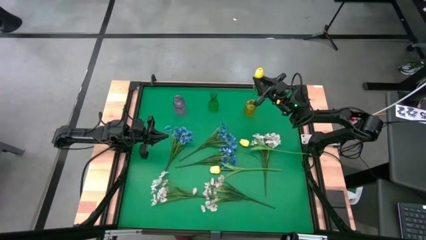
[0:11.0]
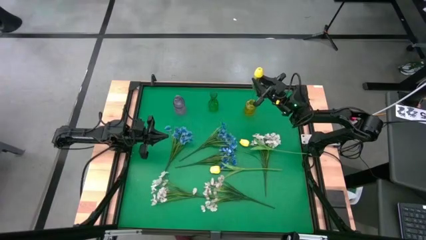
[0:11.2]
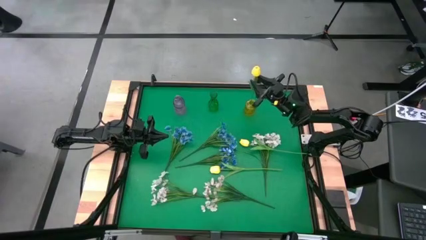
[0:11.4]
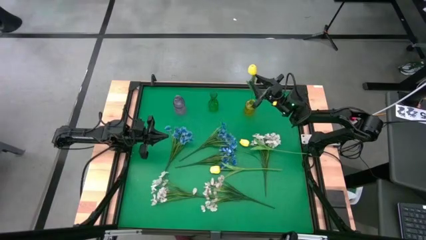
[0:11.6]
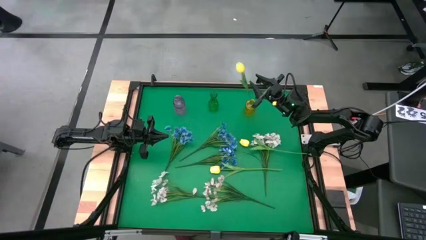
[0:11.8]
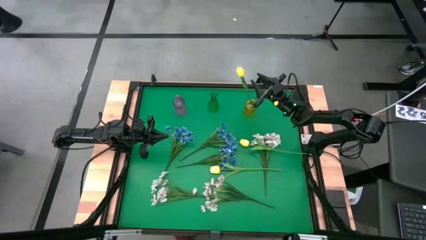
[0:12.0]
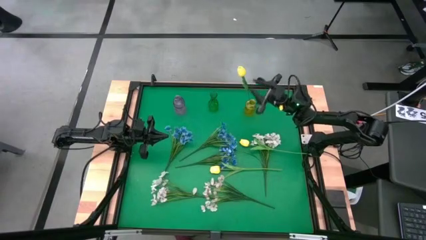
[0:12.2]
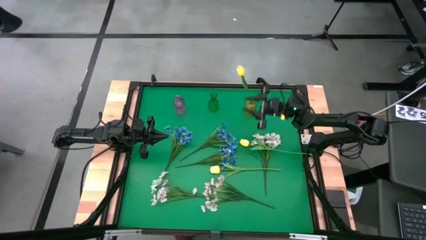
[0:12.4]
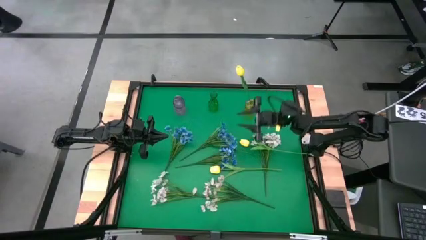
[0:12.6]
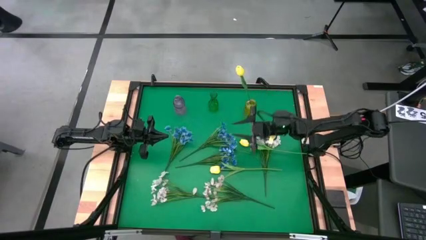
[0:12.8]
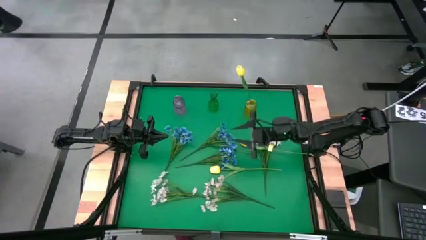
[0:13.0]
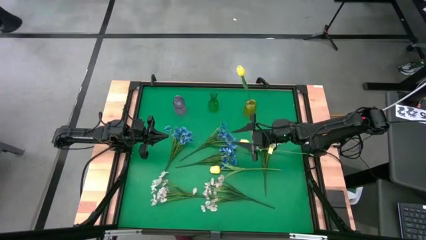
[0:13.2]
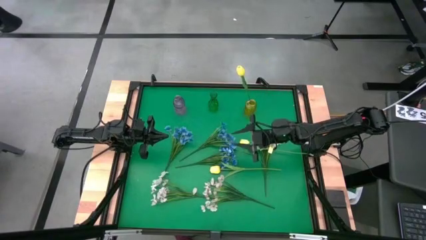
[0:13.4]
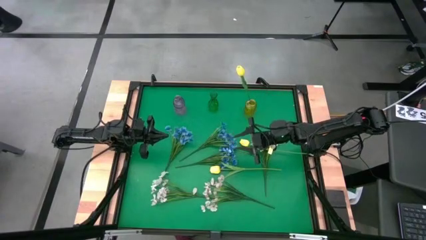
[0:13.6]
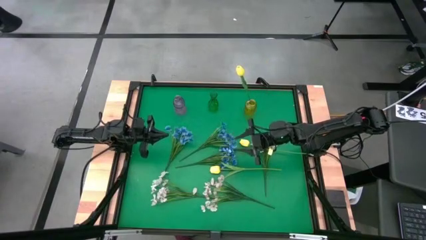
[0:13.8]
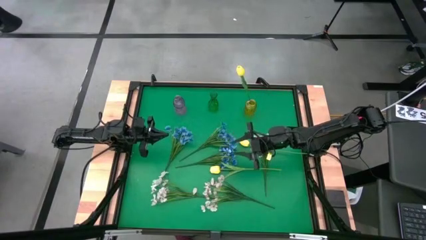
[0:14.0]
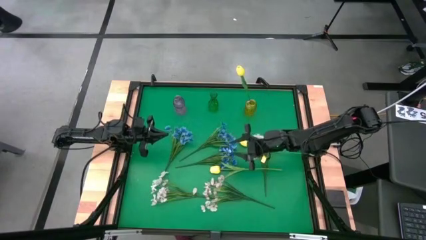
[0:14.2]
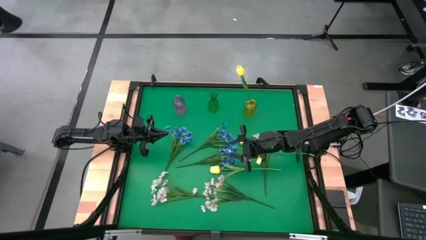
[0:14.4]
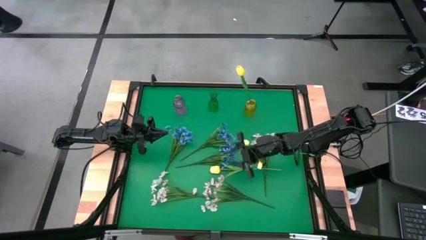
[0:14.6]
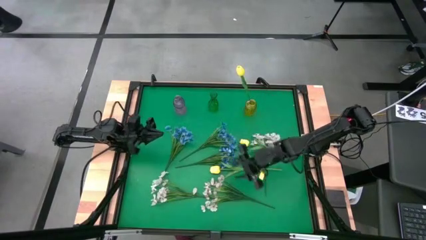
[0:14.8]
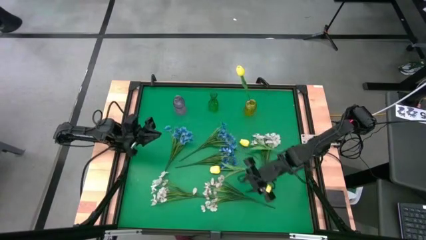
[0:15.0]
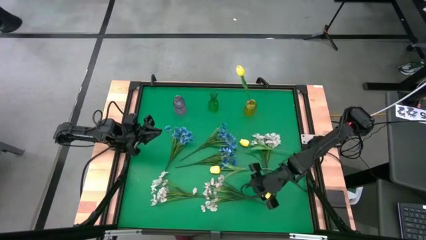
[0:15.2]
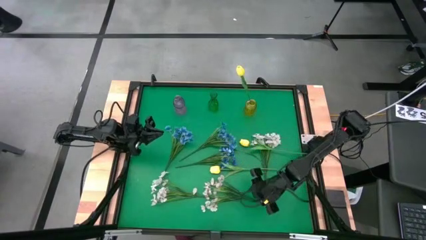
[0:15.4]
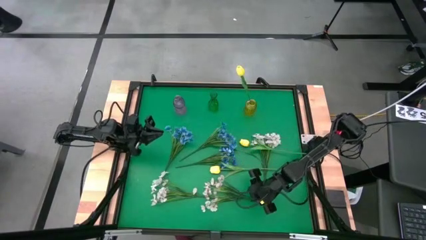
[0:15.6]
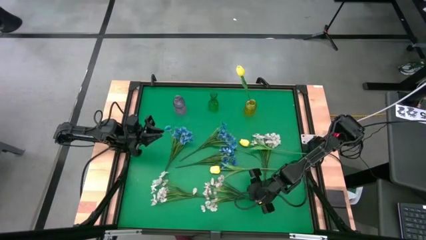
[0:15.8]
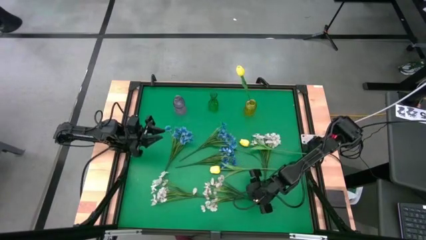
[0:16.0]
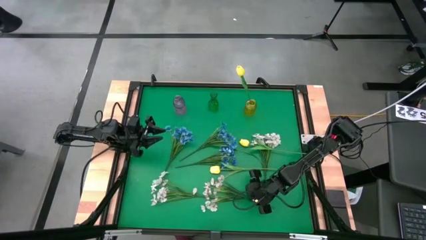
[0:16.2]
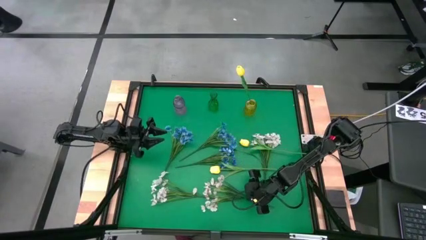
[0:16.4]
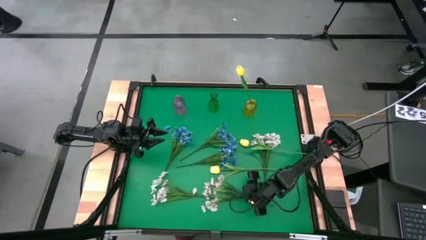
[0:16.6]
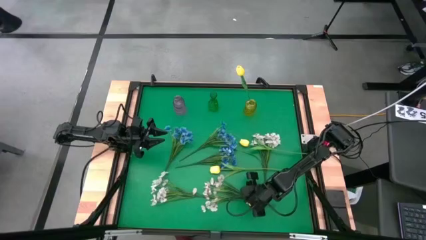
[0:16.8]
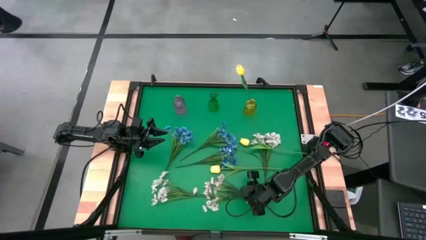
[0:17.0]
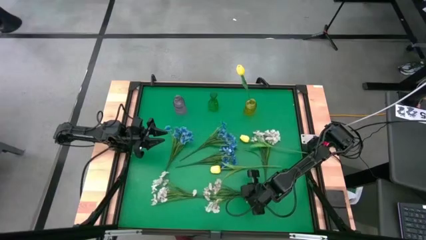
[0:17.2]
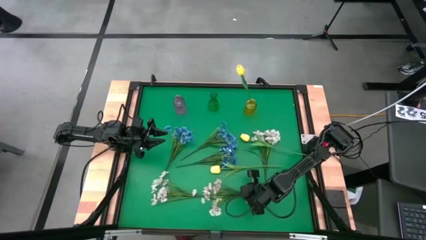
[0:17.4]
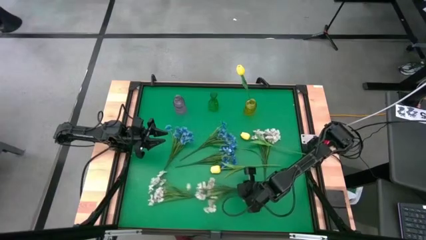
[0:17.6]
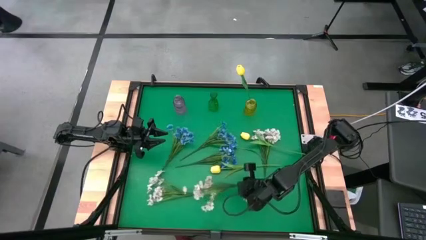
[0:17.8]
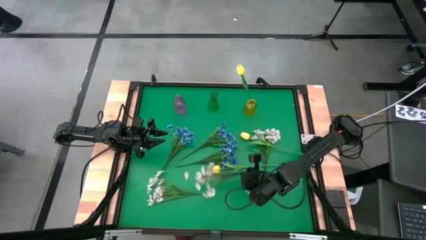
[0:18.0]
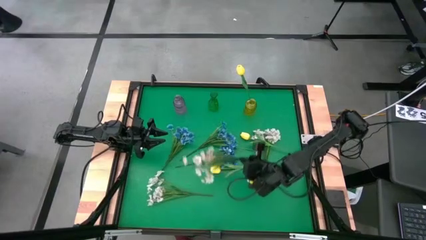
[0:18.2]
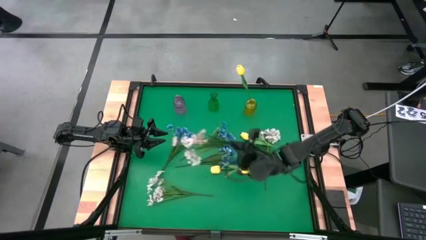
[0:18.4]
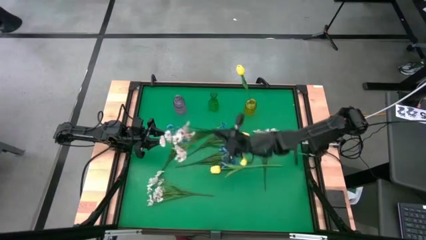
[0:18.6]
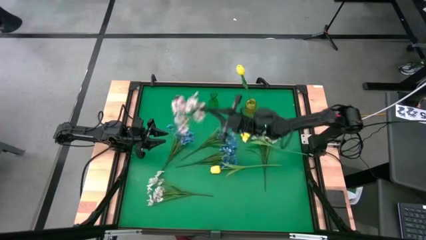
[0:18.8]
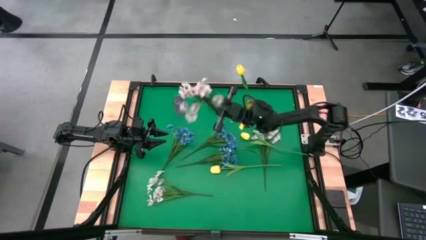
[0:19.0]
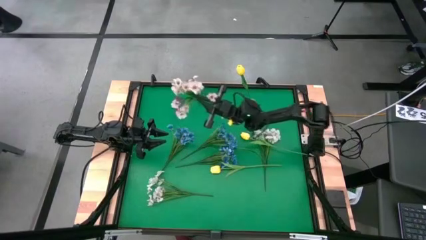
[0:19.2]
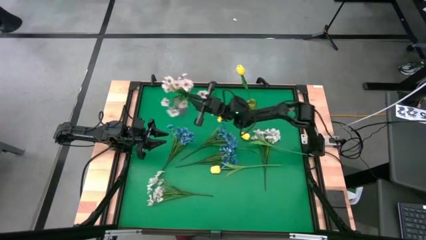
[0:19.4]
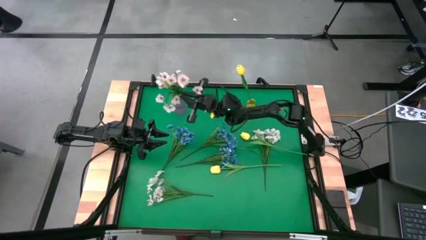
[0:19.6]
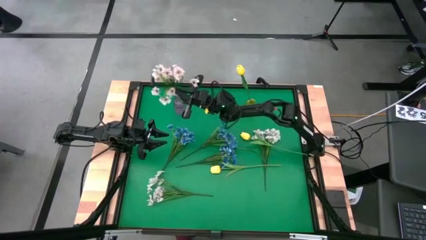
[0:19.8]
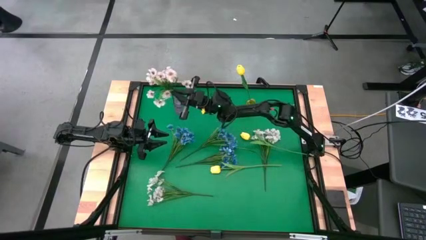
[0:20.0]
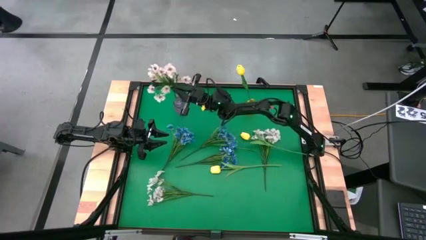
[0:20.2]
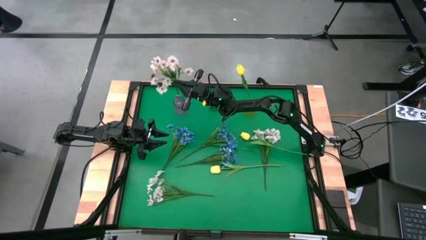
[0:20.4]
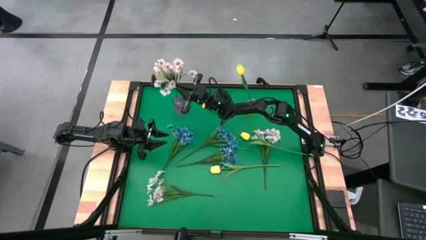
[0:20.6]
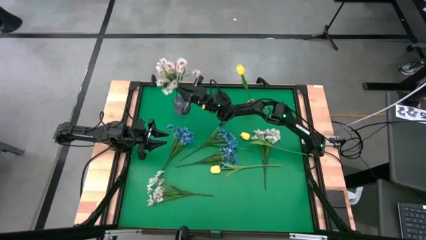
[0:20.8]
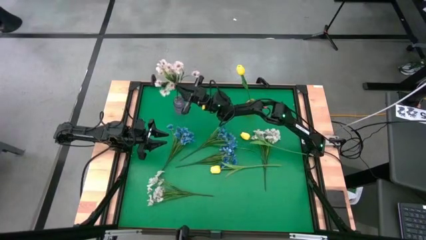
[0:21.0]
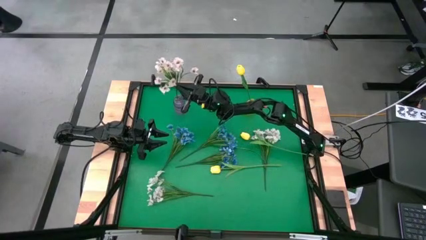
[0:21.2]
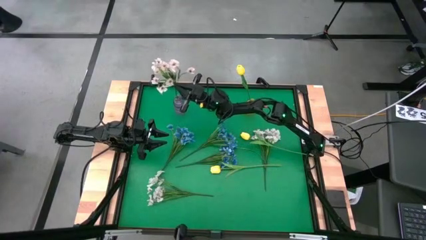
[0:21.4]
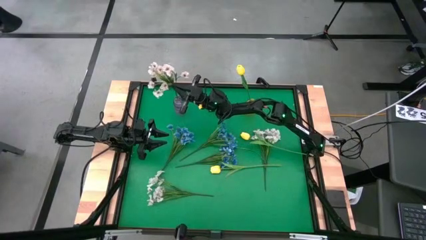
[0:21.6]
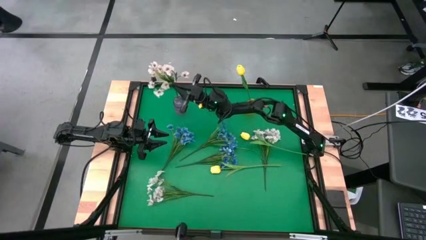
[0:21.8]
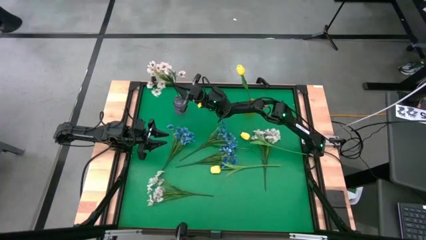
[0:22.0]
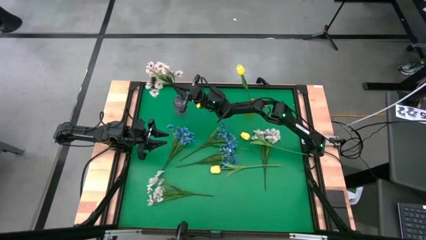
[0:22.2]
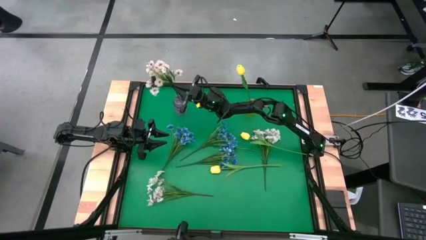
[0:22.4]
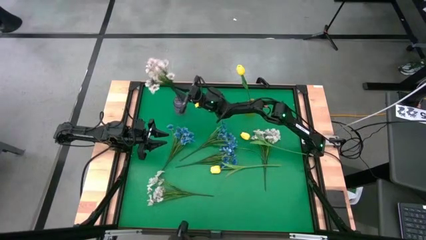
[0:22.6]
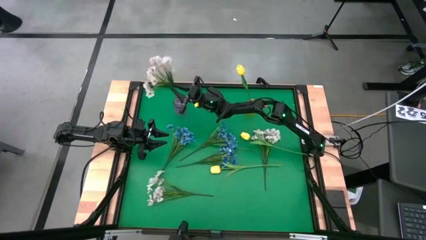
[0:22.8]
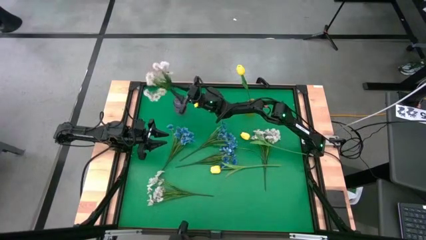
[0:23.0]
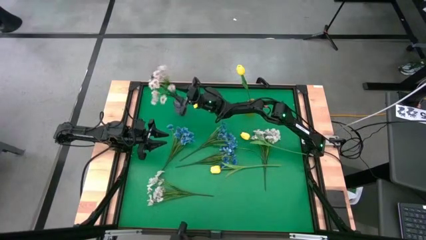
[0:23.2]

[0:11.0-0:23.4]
Task: Sort flowers into vase by color
Put the center white flower into the violet vase

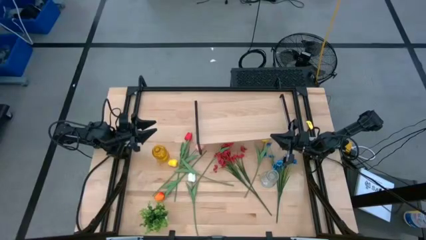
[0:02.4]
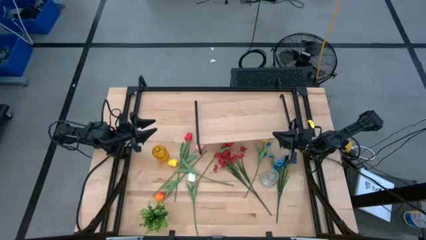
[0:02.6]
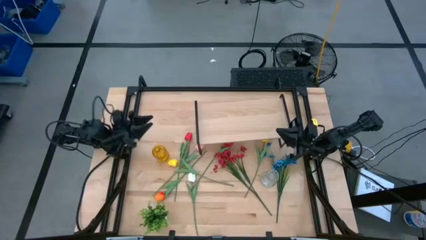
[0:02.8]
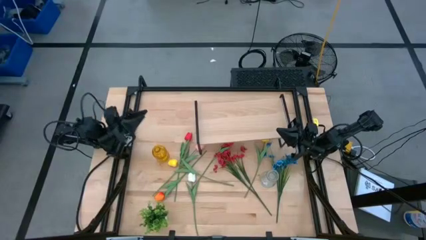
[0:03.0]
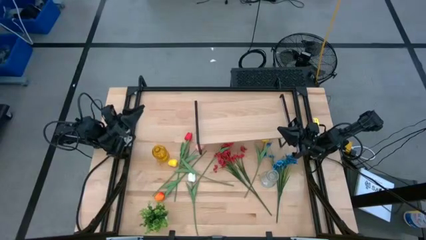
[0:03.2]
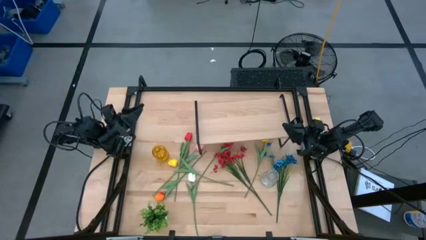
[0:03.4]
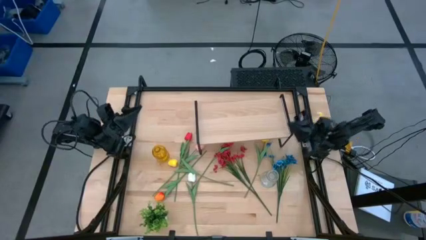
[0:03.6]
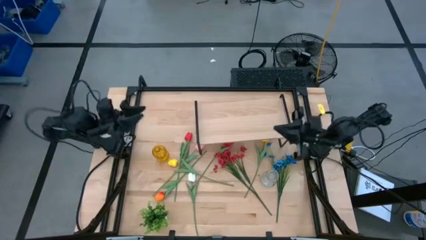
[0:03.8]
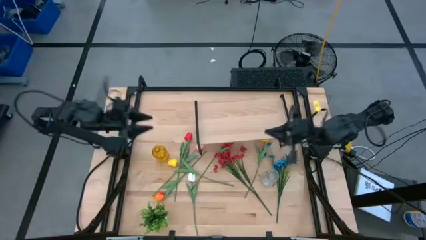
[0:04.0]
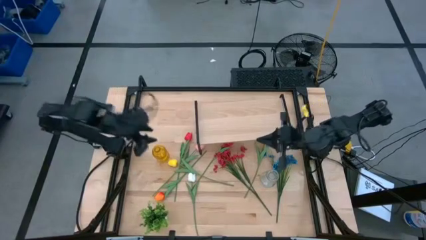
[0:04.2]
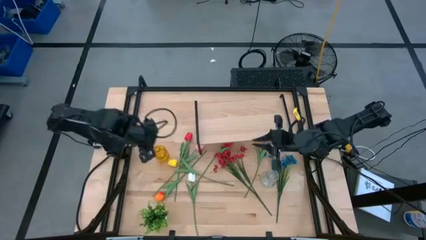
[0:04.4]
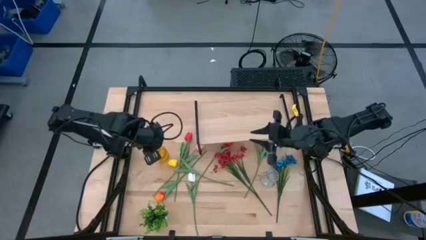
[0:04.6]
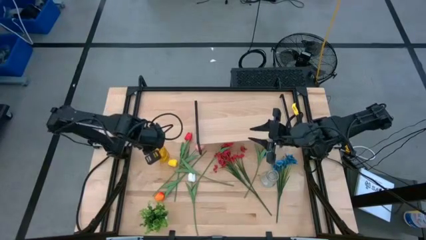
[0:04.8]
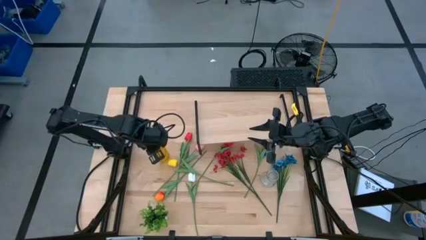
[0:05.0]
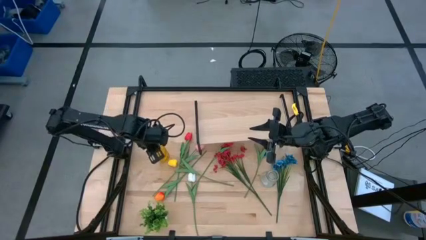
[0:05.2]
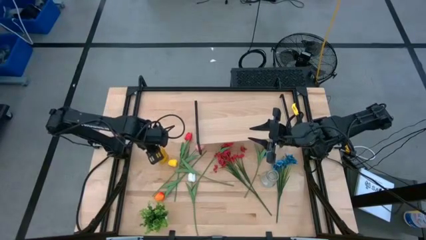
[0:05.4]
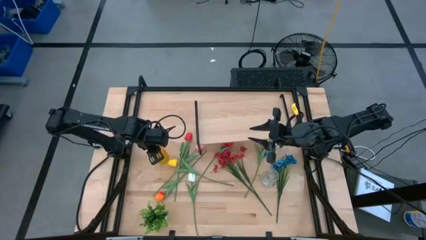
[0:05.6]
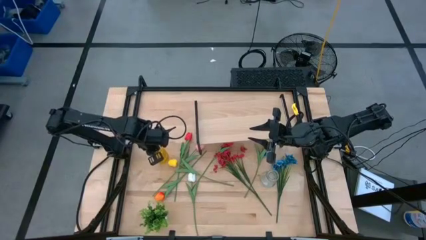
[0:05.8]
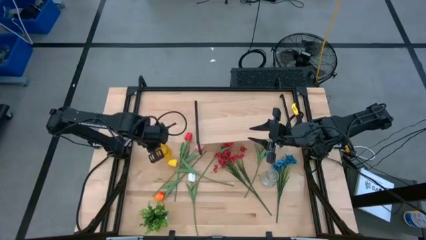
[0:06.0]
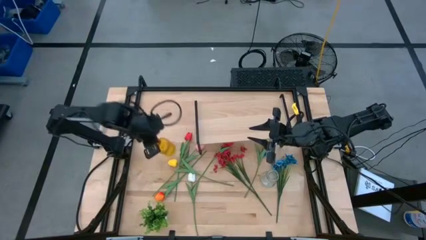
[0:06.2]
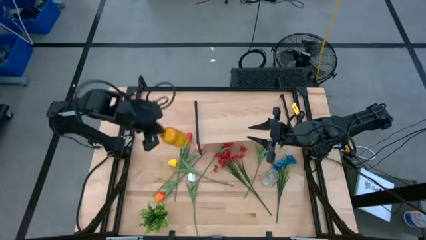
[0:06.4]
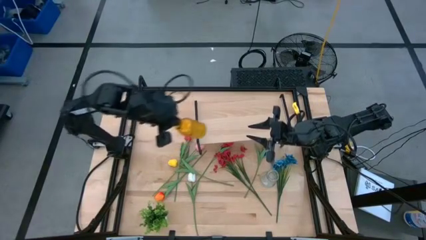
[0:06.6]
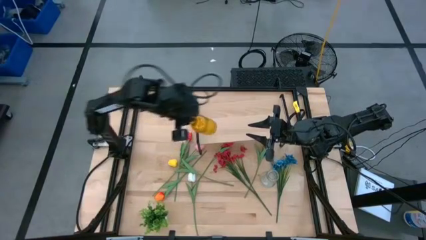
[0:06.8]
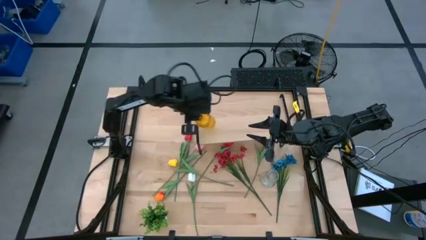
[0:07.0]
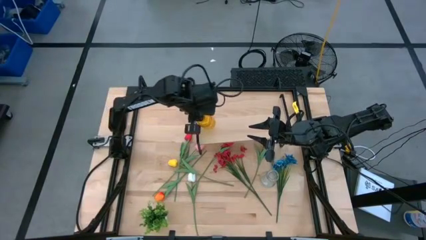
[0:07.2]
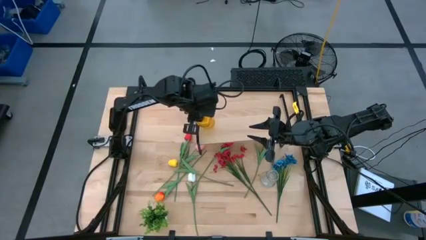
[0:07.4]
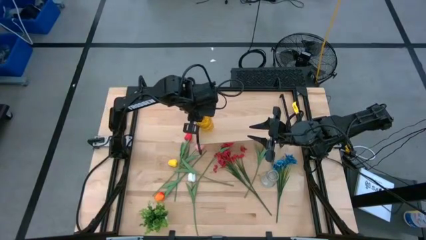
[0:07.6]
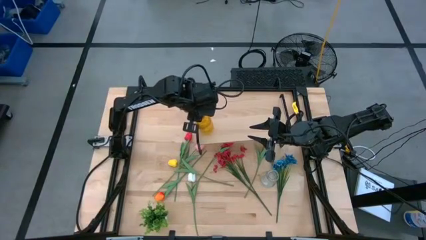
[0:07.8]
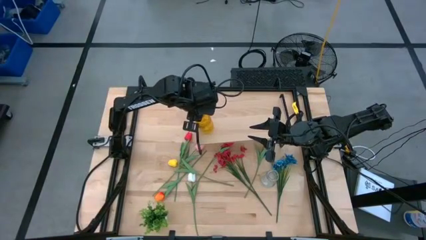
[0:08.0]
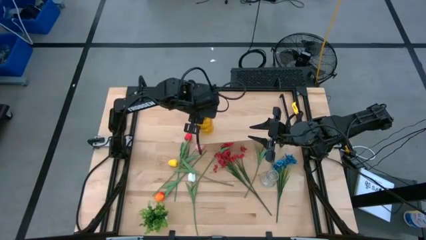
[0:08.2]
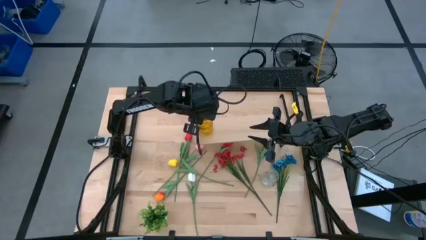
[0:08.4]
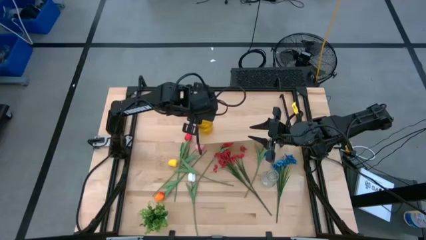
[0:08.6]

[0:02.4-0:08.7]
Task: Pick and place flowers into a vace then onto a shelf
Put the yellow vase on the shelf
